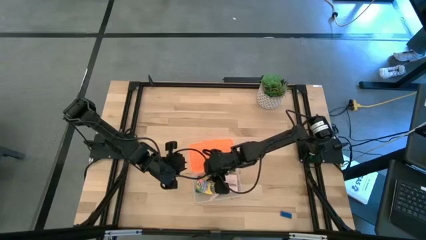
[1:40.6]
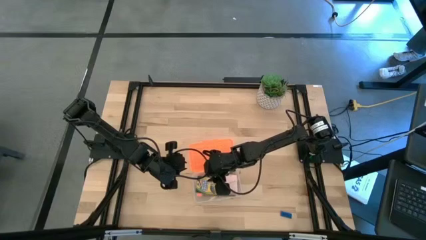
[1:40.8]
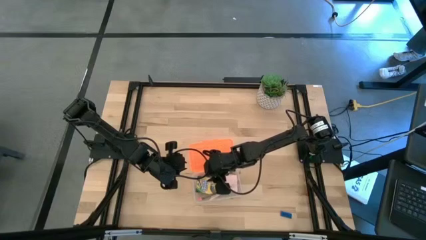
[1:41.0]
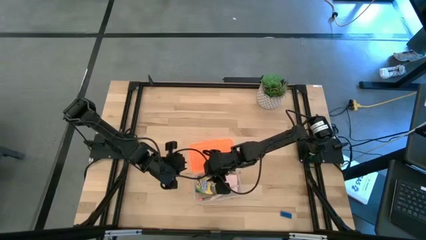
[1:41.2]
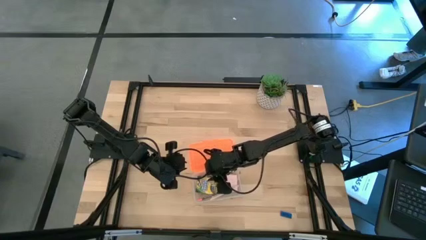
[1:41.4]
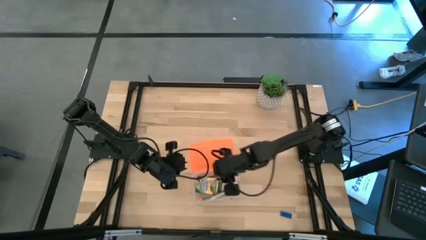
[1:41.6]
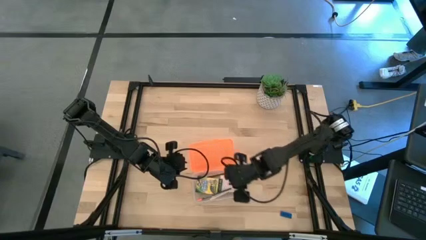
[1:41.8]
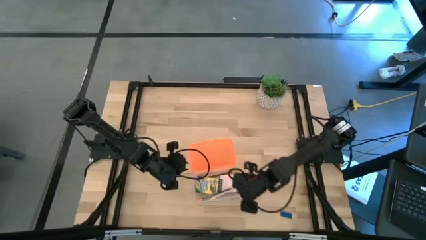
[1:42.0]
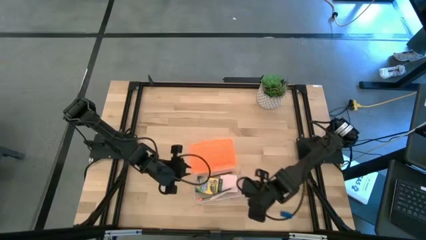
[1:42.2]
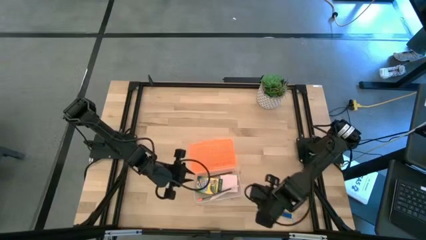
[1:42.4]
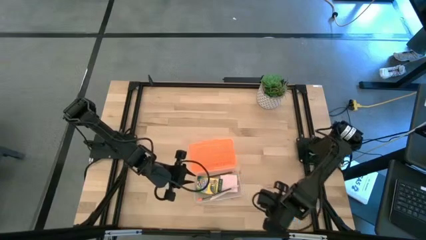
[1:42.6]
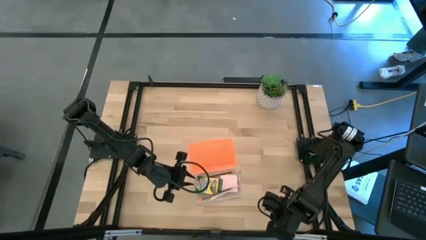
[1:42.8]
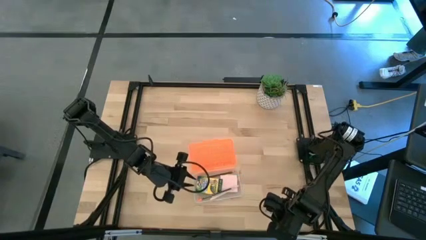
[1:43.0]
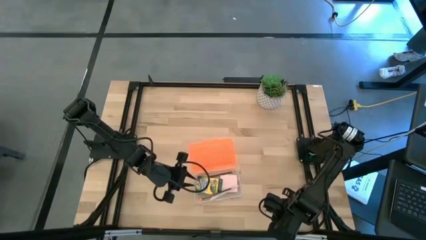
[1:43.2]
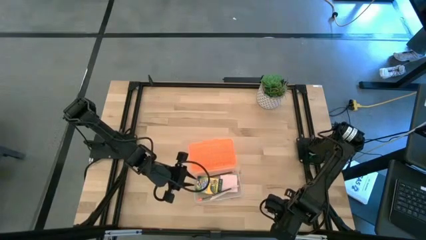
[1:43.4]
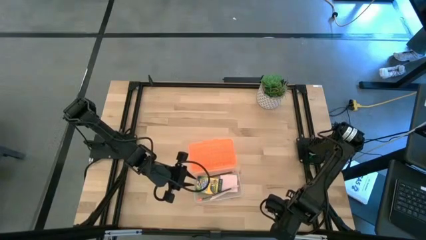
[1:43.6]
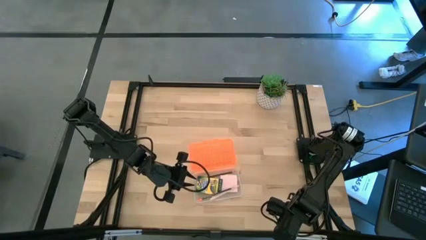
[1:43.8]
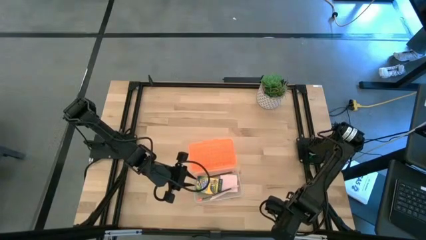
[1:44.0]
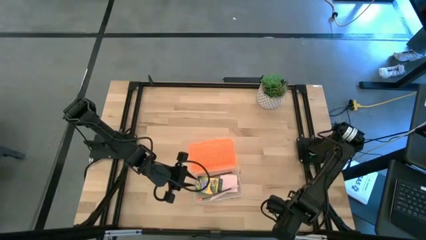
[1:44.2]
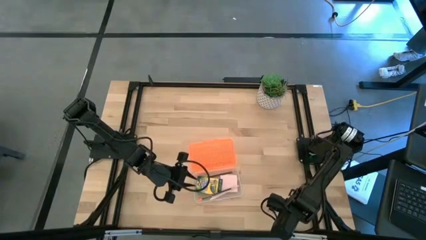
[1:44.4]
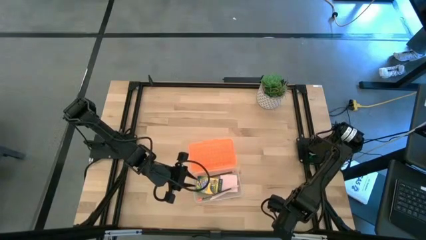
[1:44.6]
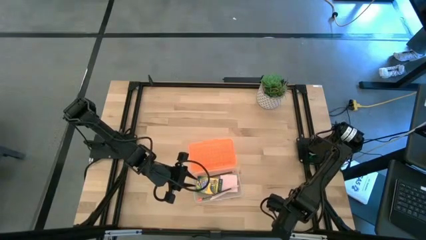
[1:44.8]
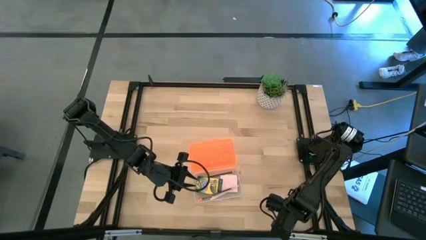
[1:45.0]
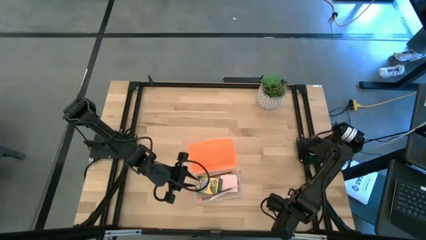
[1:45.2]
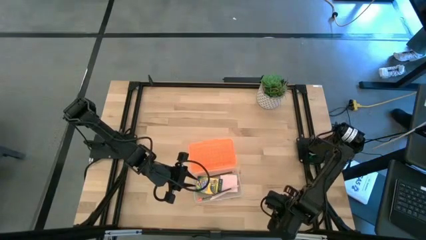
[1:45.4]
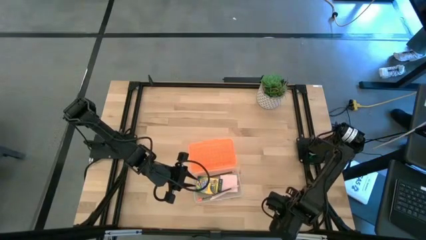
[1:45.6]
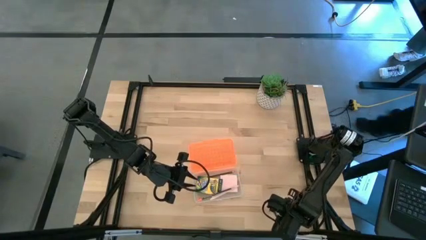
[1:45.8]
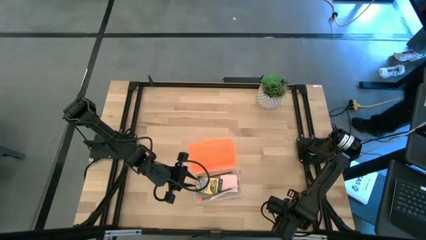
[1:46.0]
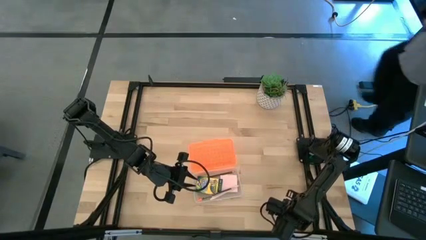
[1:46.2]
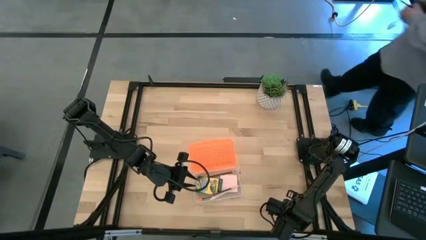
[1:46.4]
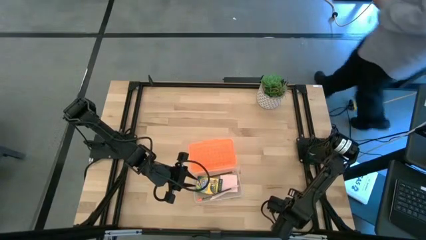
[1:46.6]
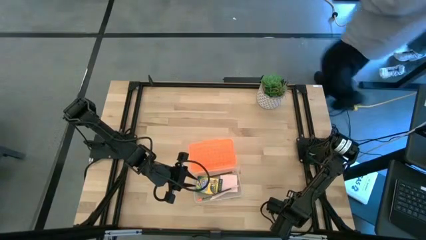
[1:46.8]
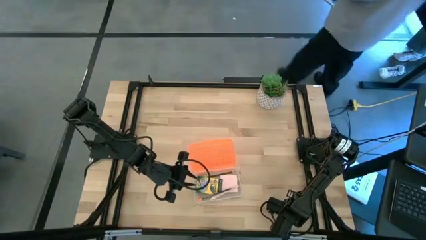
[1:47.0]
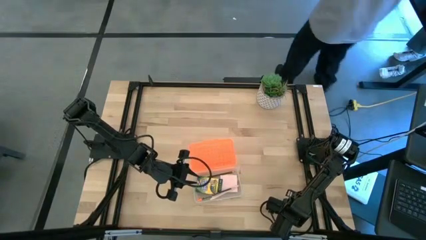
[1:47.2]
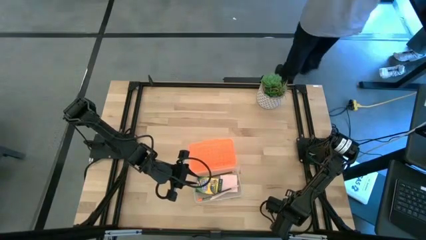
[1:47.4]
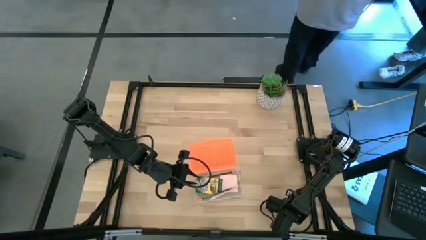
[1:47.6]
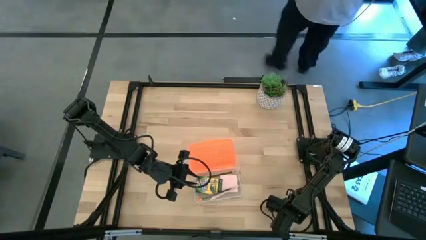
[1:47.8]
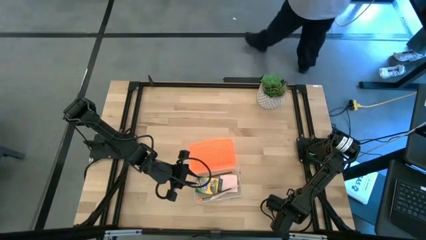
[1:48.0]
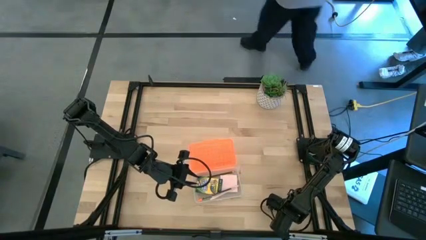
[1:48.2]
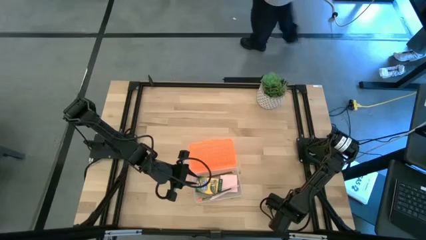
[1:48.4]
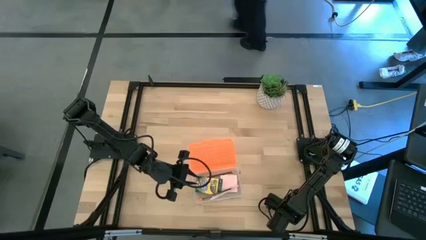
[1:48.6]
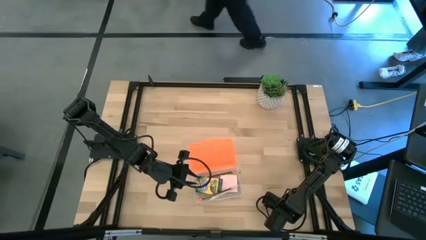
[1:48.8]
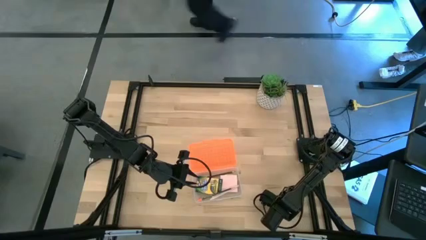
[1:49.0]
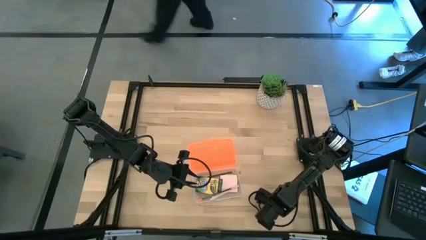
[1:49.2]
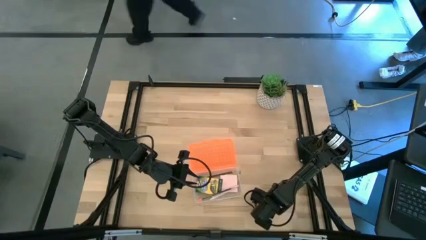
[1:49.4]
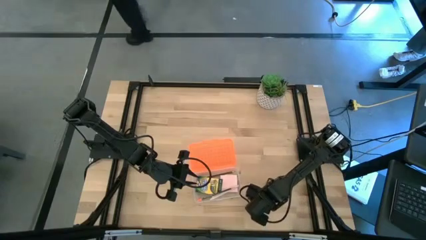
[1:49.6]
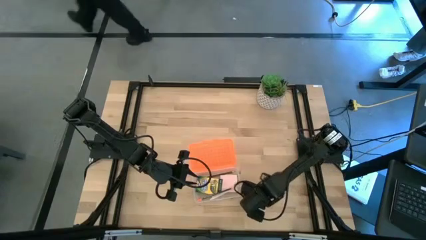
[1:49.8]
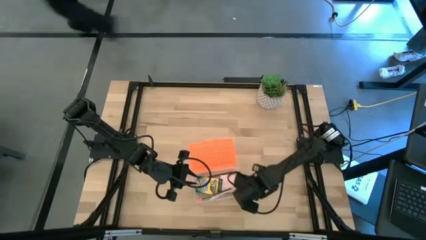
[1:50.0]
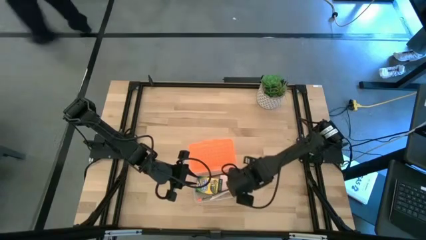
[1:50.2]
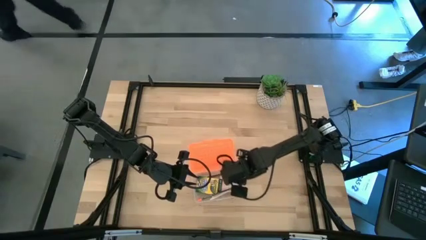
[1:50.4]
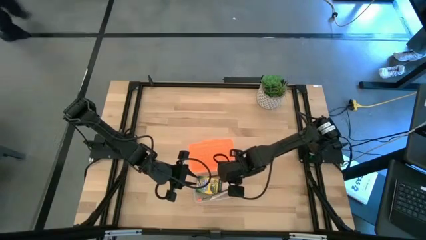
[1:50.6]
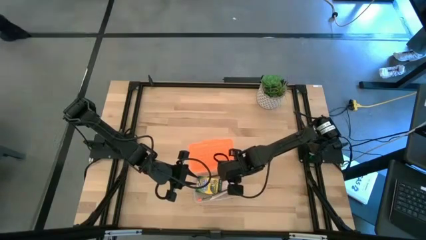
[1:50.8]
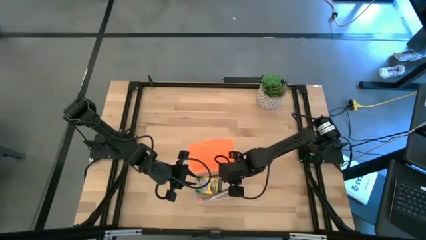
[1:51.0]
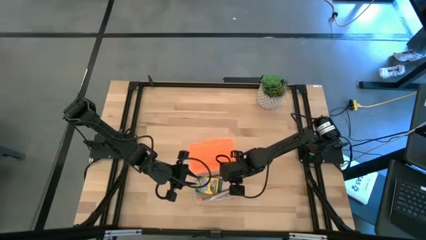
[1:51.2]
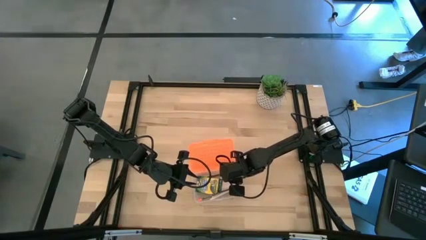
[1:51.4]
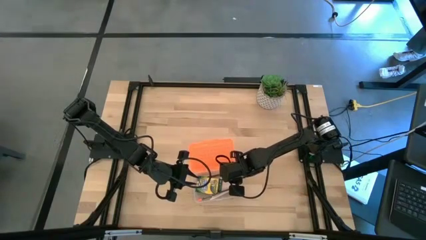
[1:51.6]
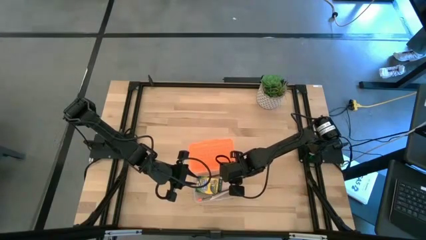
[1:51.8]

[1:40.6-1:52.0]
Task: Pack school essentials
Put the blue eraser into the supply box

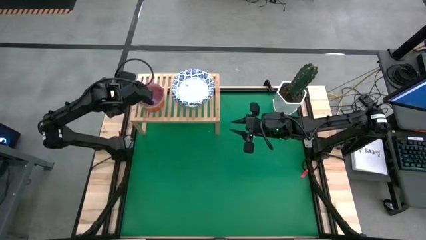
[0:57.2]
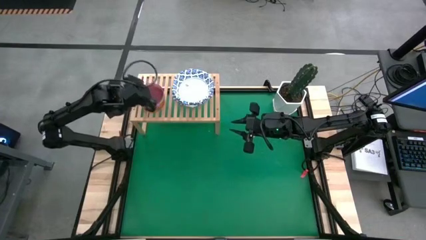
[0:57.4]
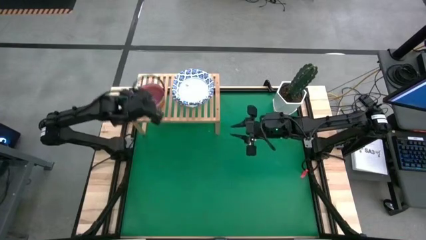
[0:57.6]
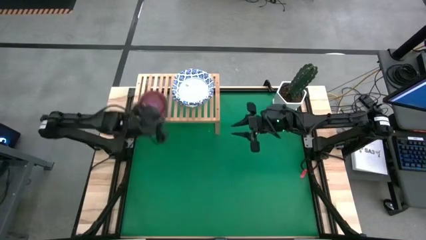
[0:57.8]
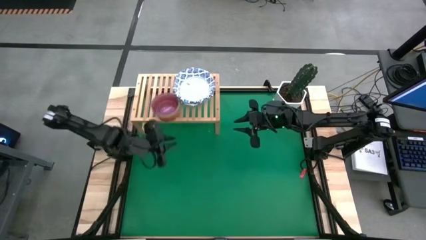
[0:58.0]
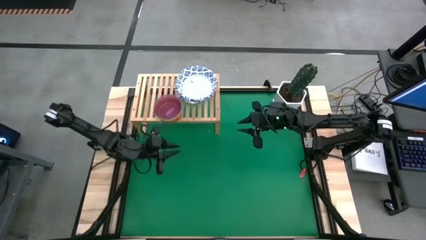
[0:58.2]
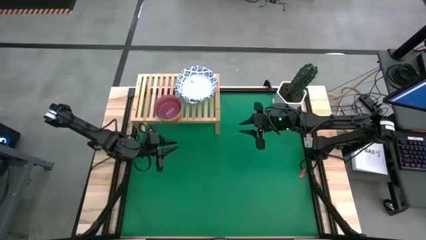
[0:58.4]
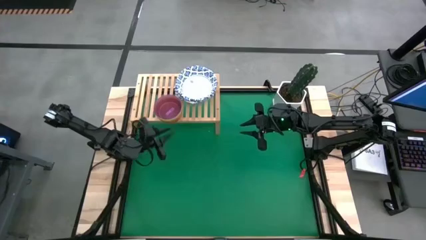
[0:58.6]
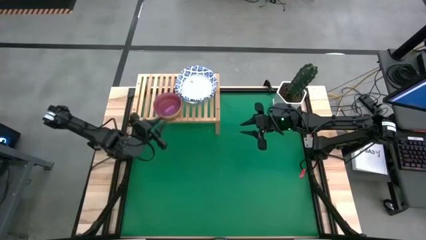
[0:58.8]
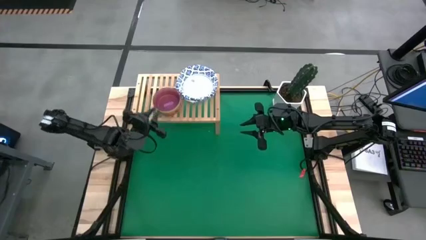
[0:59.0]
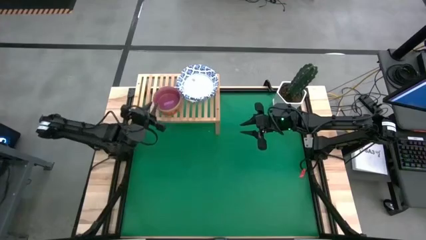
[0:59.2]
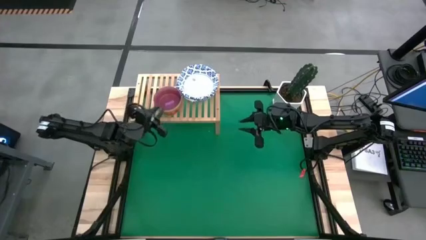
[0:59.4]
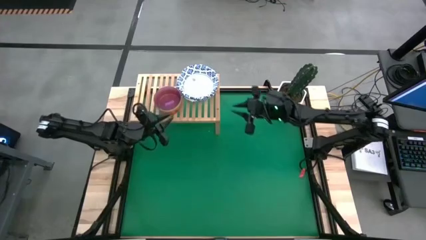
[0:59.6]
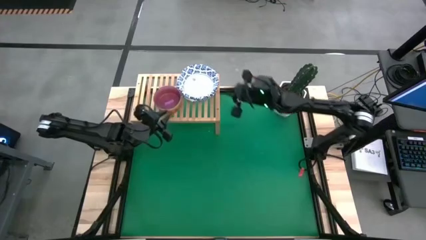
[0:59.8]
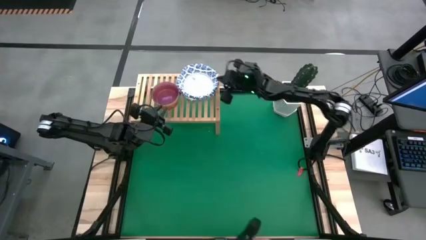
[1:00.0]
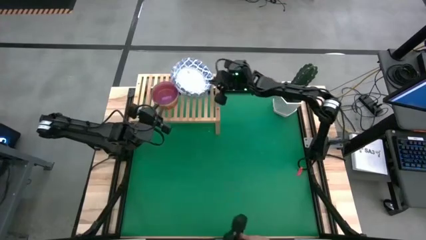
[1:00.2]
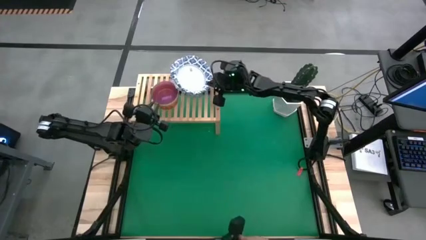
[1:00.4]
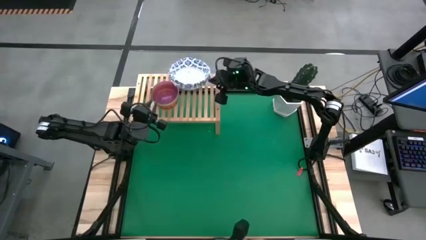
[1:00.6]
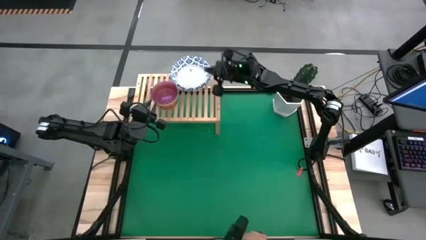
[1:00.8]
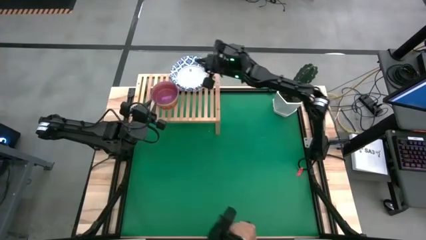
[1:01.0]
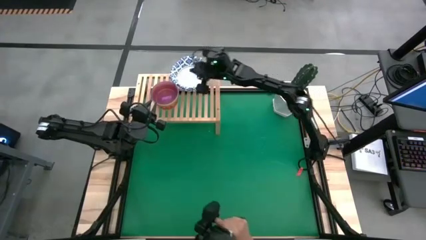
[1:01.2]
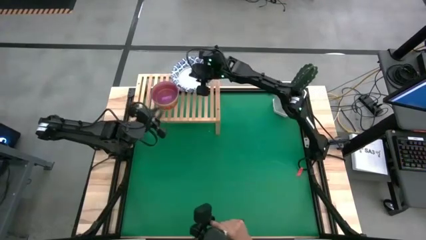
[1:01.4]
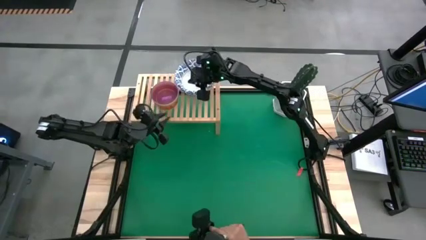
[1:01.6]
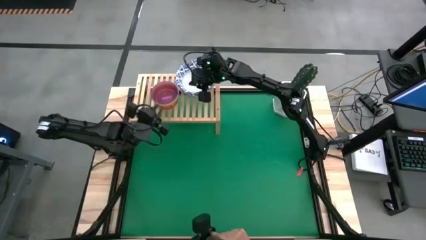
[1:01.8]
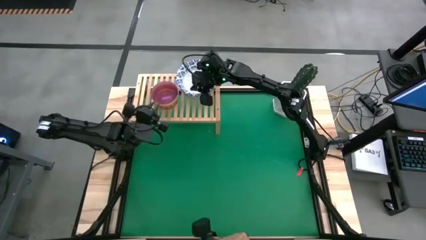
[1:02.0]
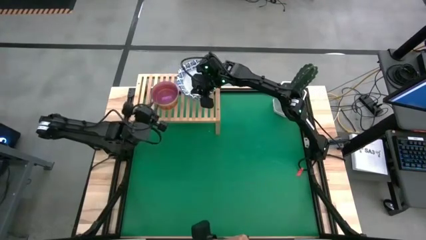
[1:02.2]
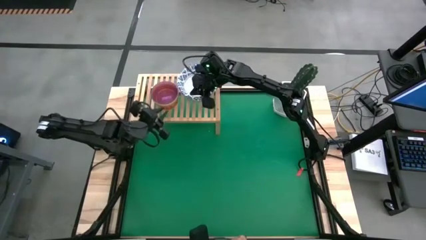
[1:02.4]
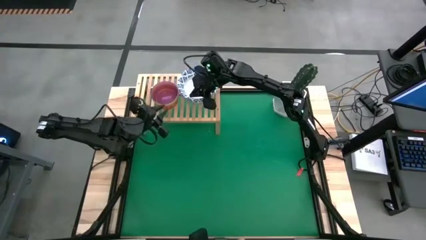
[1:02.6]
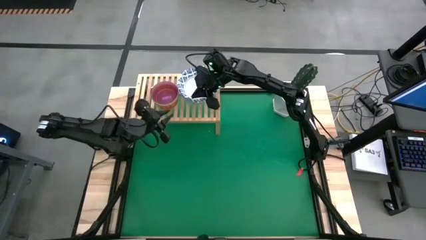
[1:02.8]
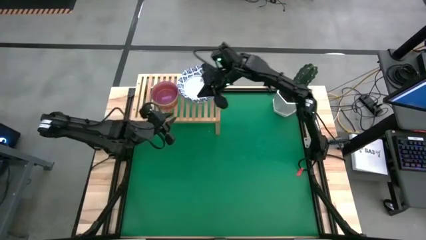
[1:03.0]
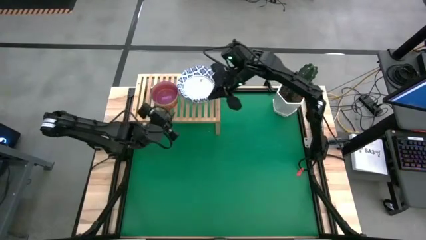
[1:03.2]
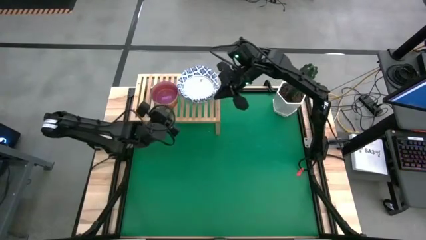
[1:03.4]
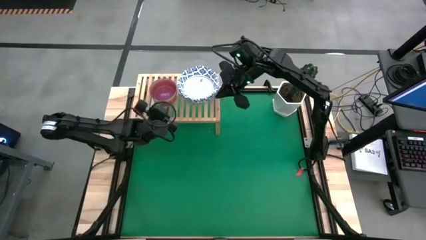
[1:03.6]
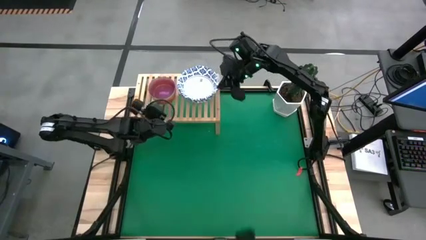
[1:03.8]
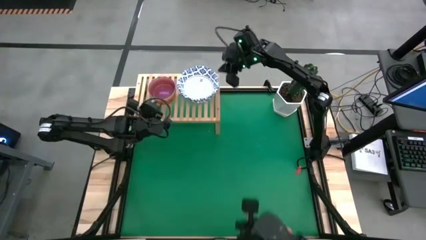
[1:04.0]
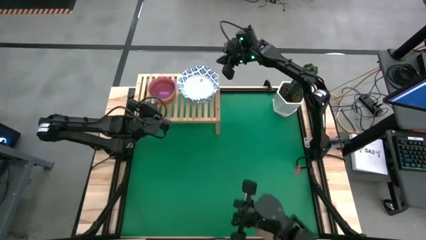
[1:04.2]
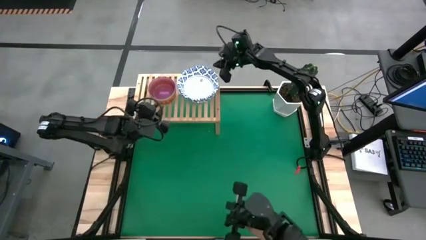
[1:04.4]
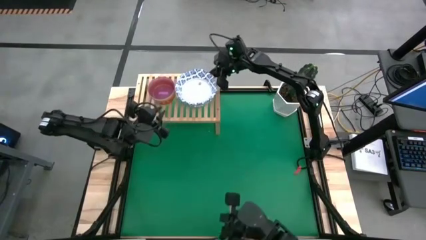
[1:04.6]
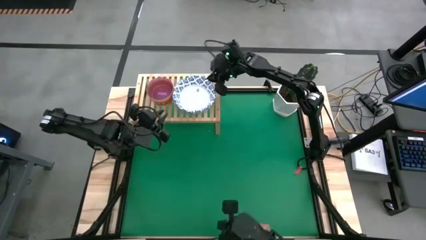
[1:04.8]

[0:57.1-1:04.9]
Task: Place and stack bowls onto a shelf
Adjust the bowls on the shelf
